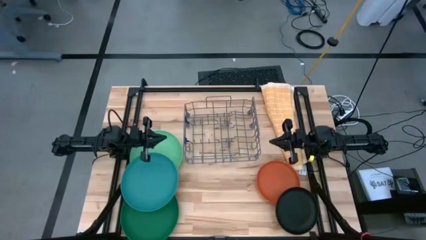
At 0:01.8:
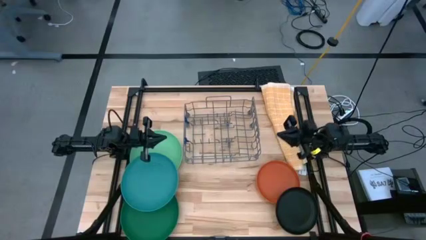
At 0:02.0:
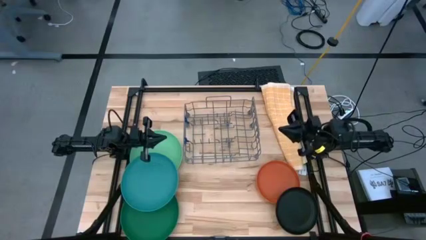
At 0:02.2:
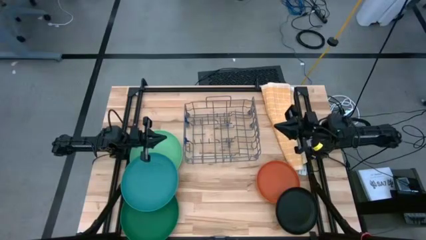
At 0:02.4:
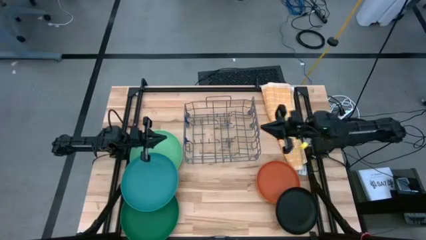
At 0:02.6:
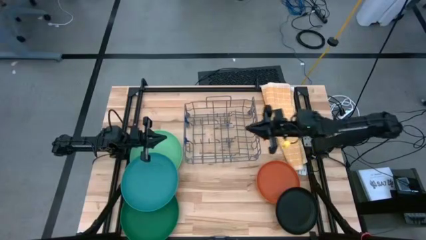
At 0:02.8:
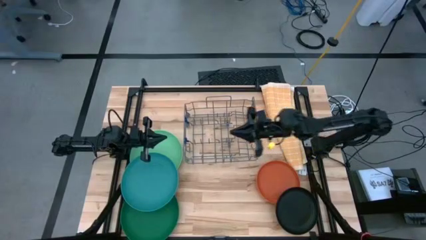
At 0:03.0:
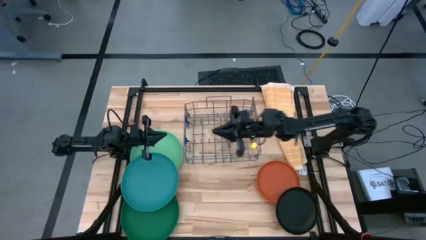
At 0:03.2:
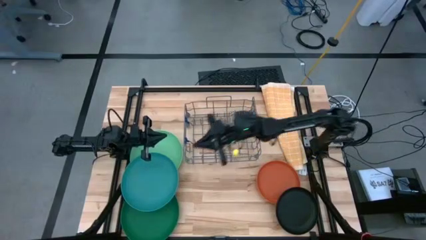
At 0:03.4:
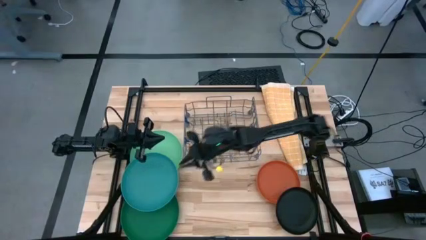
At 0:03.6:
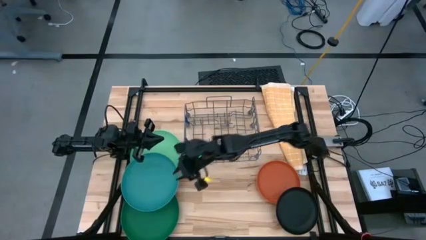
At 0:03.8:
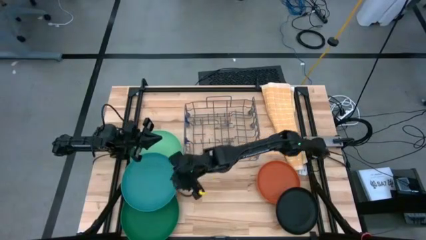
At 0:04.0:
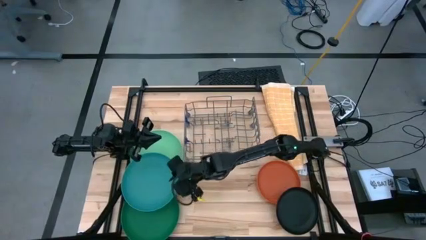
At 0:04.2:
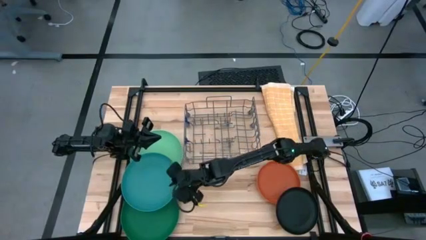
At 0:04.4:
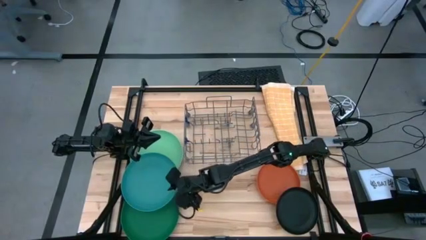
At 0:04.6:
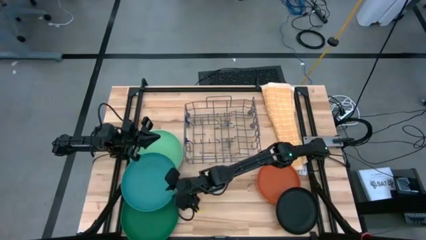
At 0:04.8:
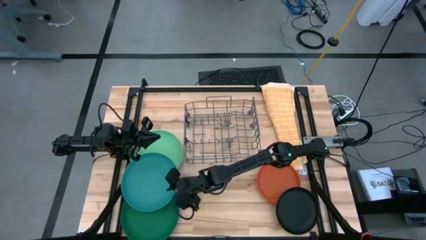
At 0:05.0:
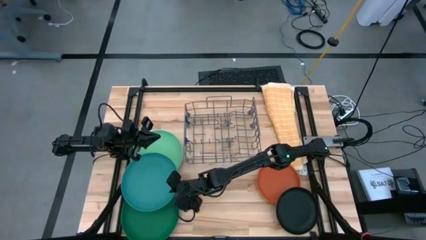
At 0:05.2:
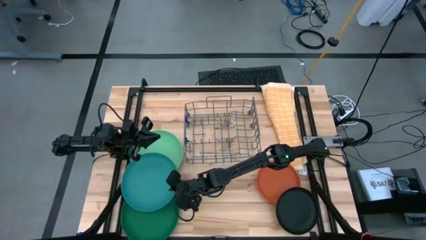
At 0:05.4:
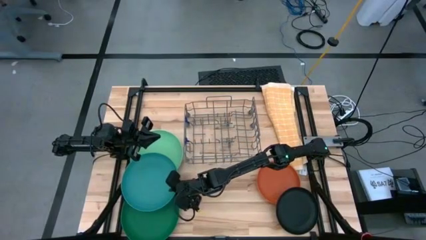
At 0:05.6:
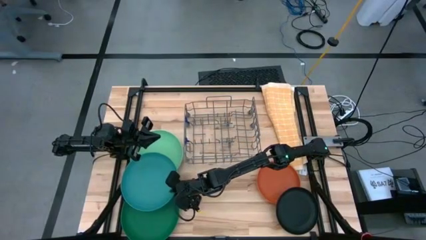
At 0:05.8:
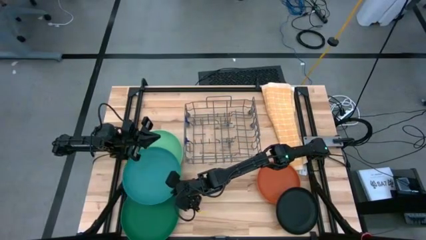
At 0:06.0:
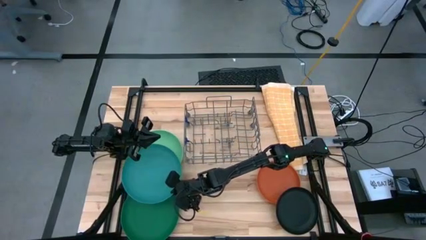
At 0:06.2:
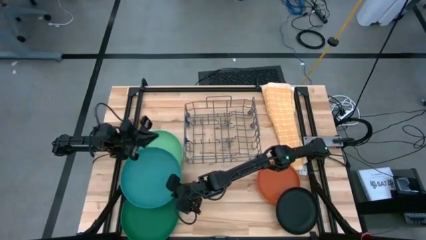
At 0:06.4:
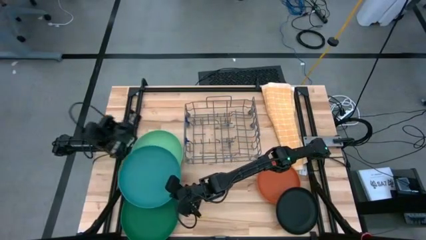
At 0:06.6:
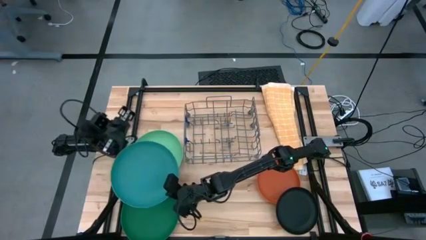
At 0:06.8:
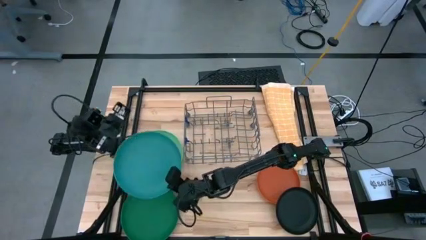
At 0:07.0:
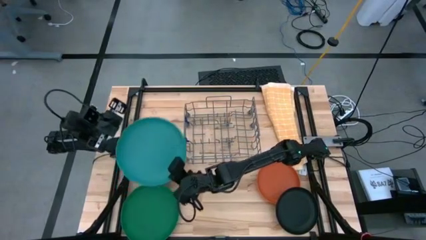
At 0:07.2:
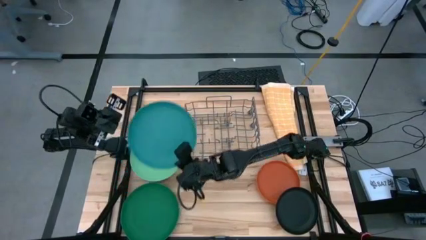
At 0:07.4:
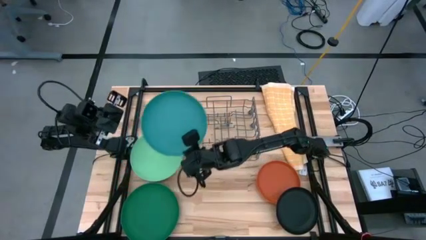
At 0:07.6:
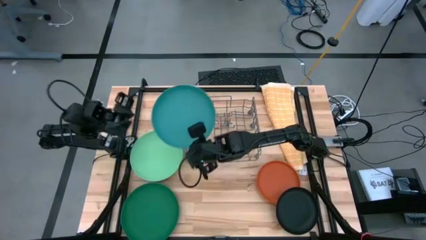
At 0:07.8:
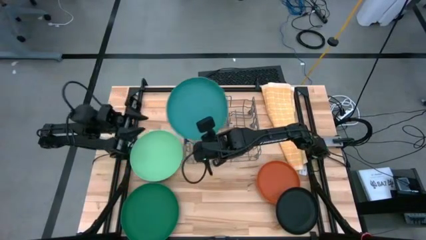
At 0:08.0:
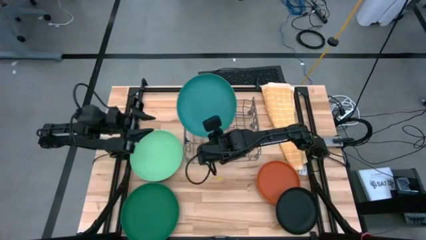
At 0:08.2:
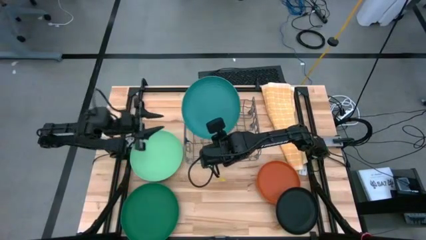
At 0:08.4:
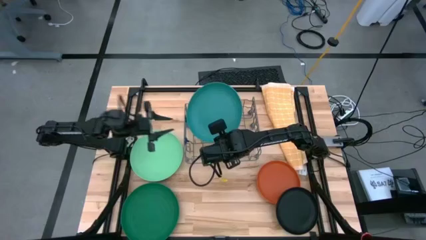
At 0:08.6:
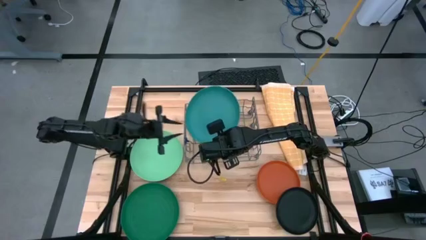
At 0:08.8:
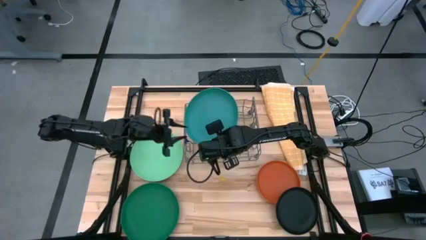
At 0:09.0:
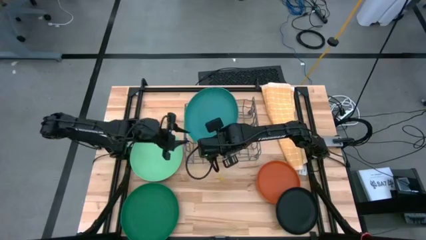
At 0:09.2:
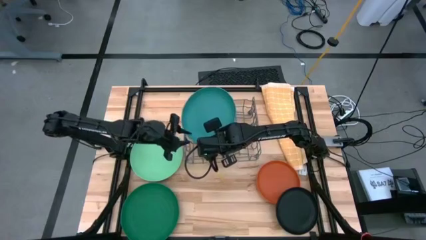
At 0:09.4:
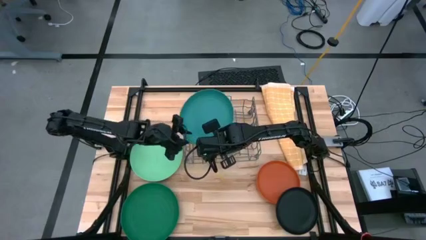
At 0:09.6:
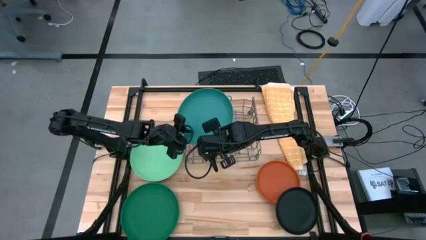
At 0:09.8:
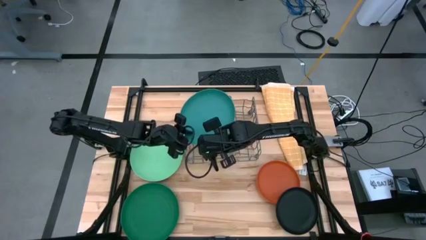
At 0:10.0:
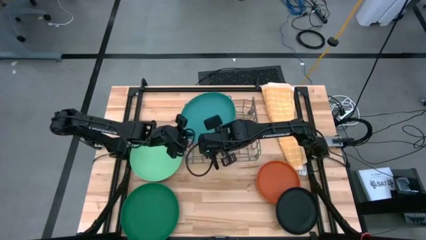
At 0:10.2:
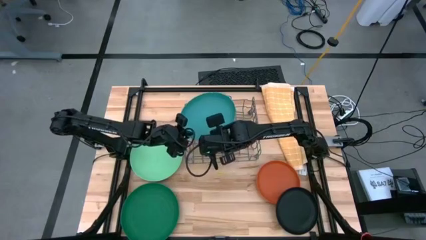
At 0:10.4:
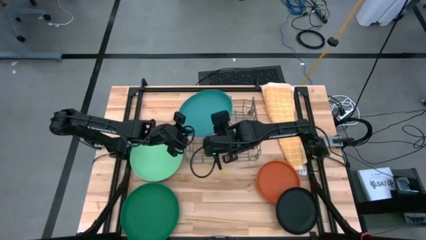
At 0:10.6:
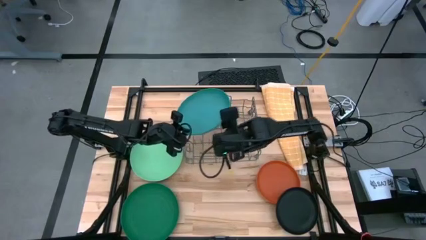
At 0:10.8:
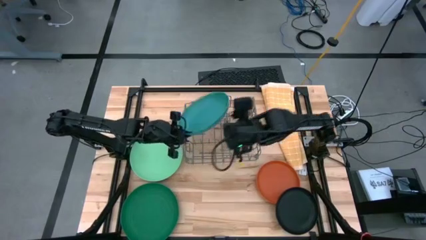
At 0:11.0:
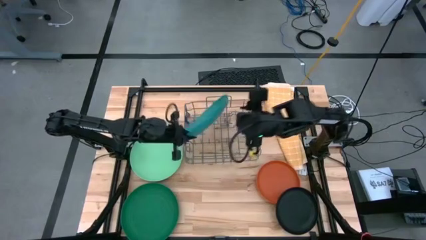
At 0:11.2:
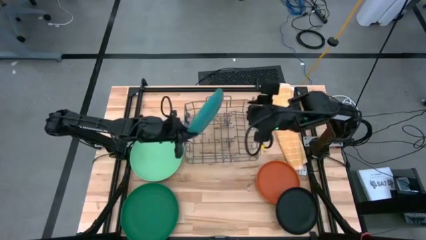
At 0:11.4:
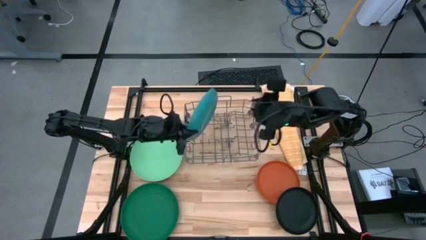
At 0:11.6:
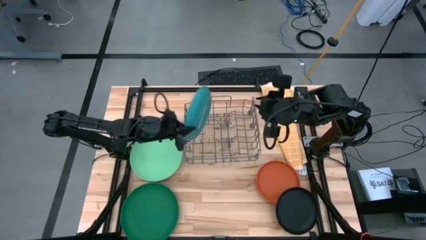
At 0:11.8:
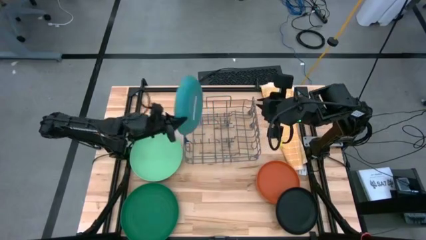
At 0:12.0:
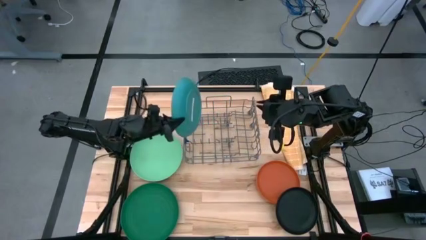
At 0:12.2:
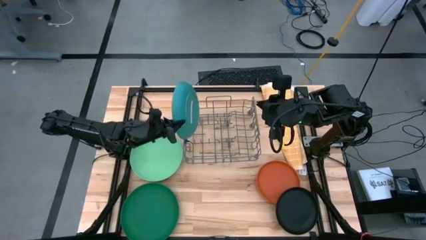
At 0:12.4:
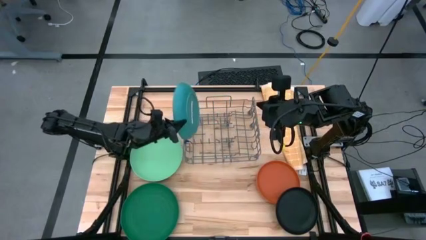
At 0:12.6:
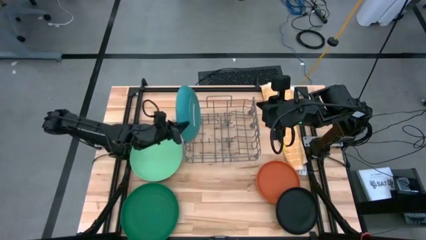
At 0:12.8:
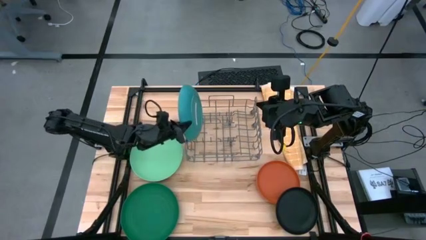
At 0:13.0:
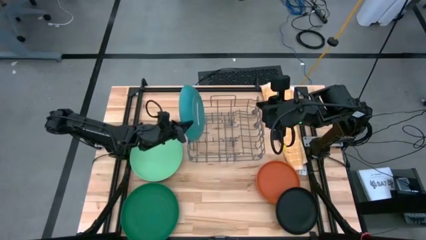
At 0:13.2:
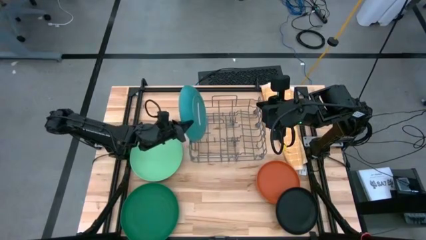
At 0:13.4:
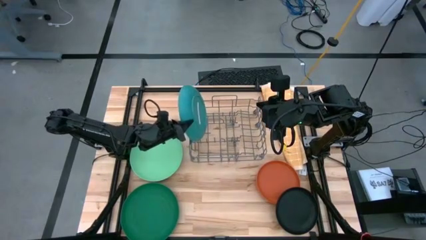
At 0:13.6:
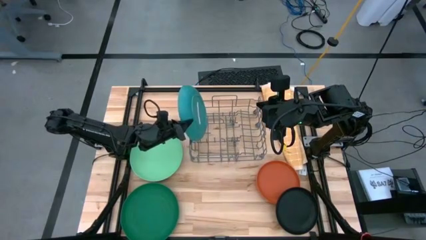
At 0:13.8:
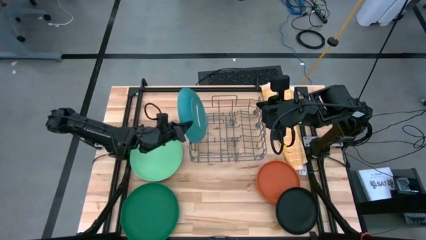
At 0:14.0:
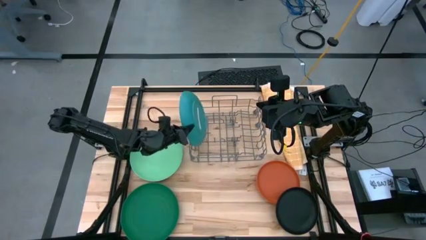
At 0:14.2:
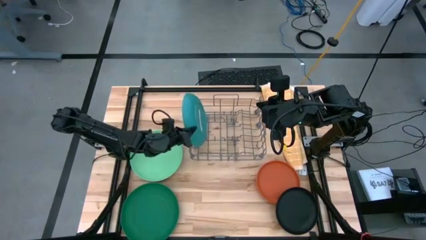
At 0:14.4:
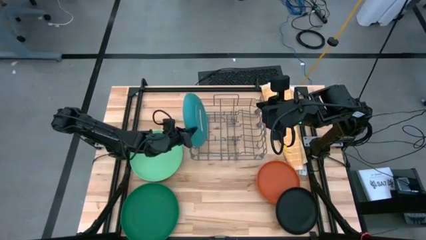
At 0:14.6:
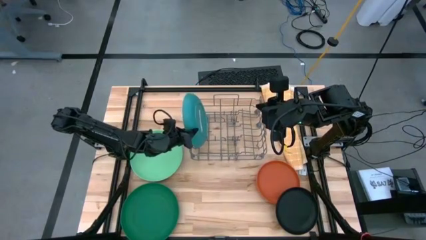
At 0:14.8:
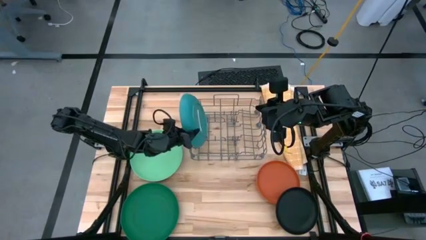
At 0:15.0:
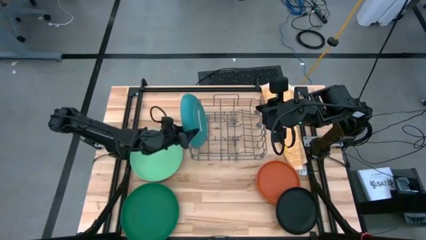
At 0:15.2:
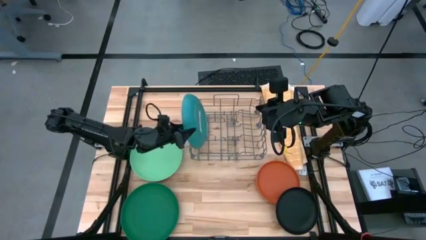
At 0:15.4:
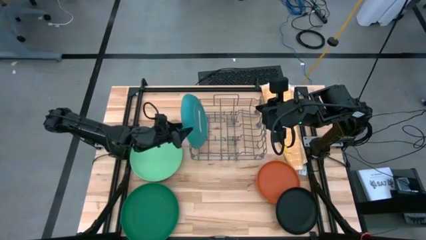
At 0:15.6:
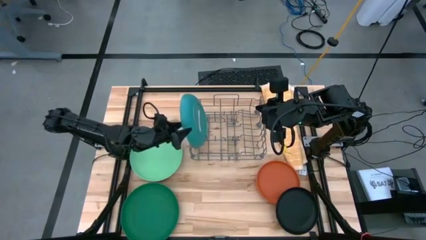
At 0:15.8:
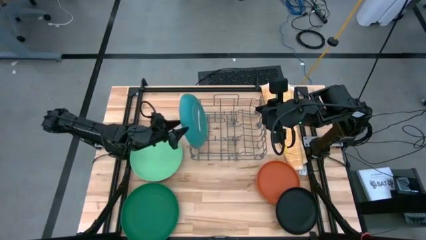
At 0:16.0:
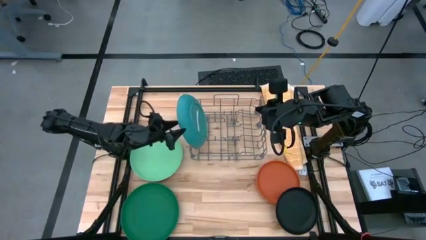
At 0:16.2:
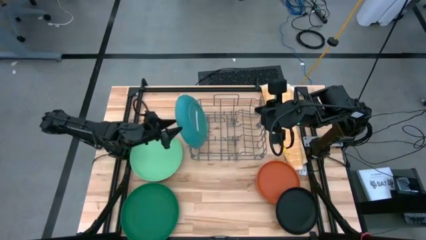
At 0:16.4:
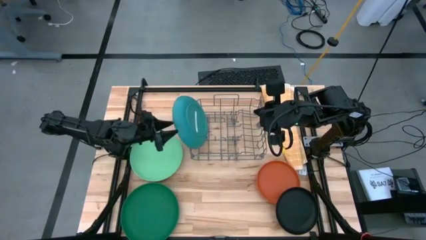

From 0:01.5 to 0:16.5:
Task: Sort dishes
Put the blue plate into the dishwasher rack
